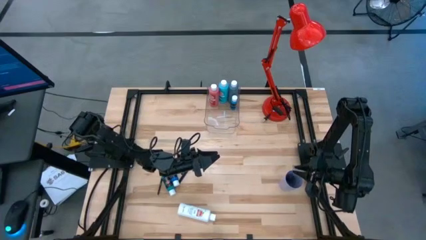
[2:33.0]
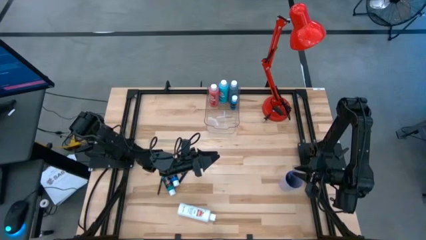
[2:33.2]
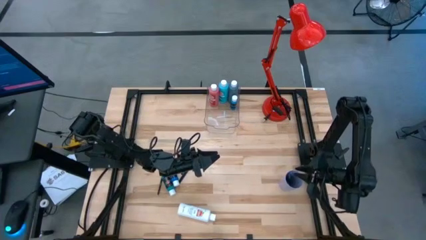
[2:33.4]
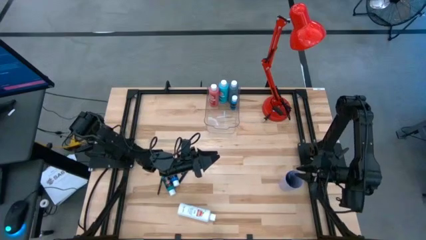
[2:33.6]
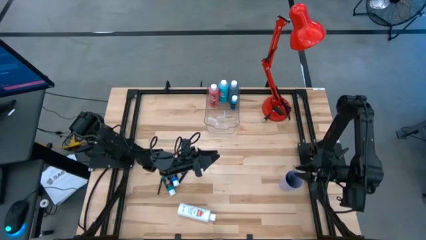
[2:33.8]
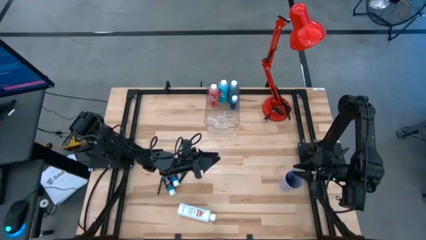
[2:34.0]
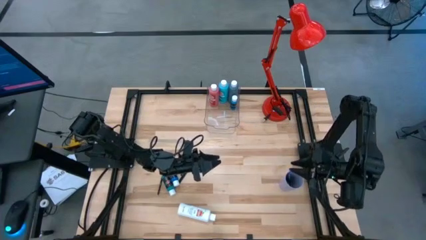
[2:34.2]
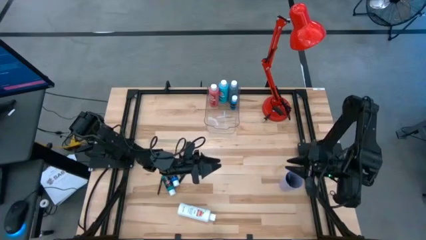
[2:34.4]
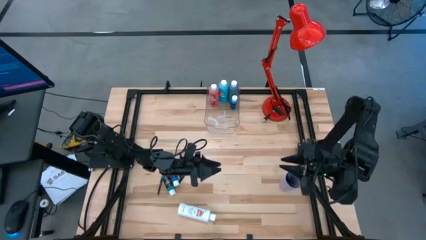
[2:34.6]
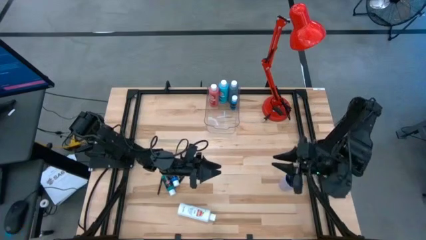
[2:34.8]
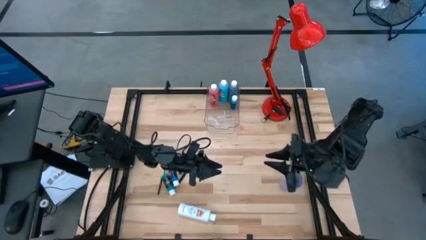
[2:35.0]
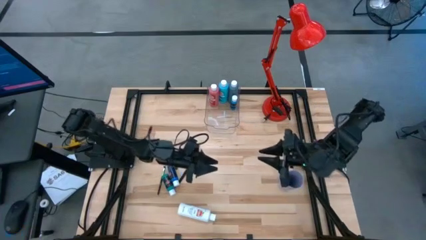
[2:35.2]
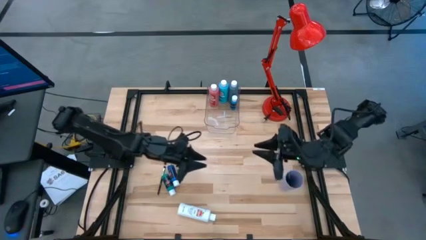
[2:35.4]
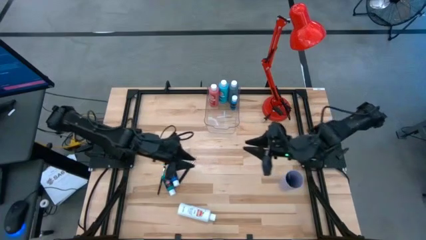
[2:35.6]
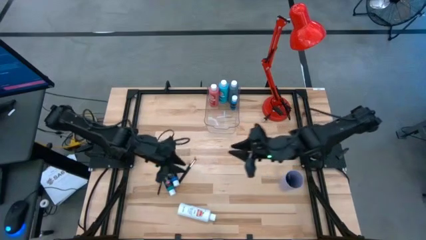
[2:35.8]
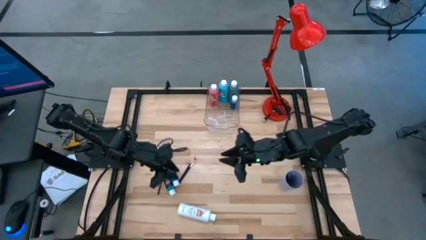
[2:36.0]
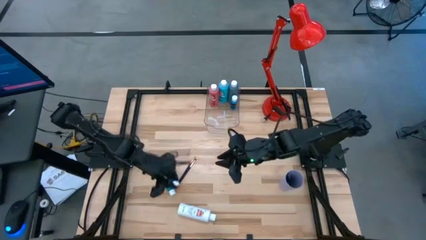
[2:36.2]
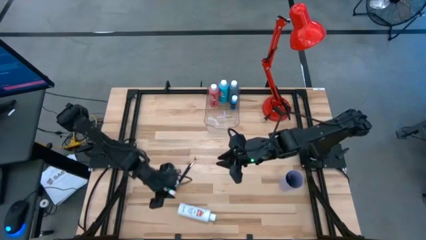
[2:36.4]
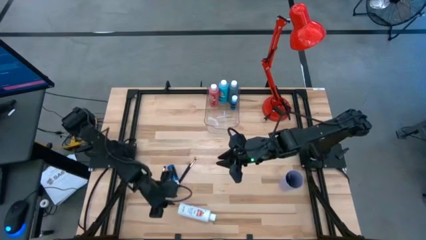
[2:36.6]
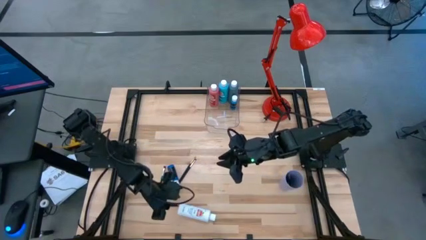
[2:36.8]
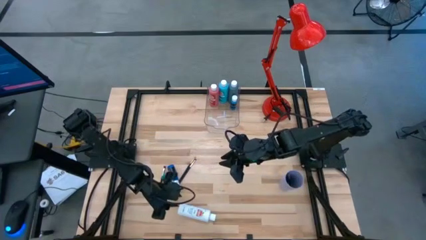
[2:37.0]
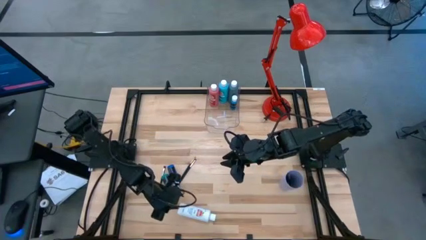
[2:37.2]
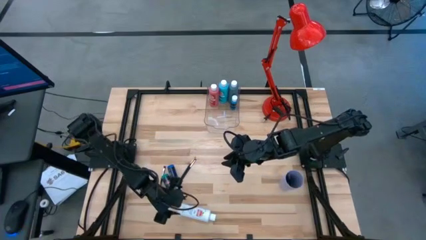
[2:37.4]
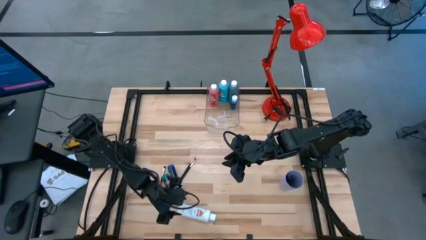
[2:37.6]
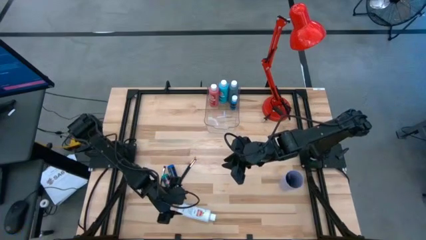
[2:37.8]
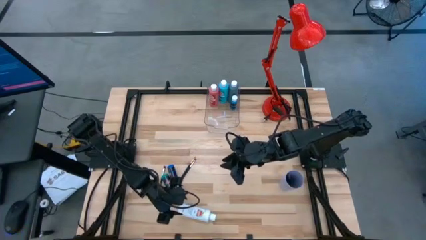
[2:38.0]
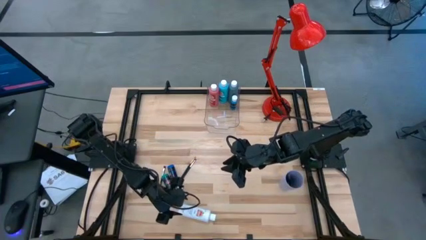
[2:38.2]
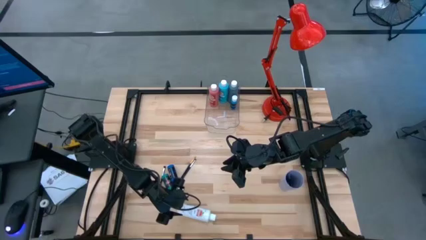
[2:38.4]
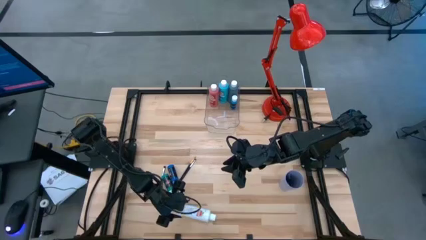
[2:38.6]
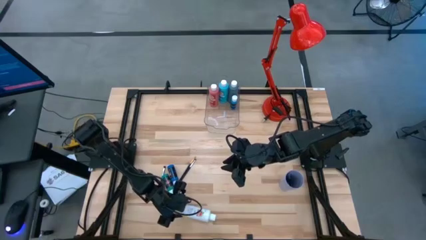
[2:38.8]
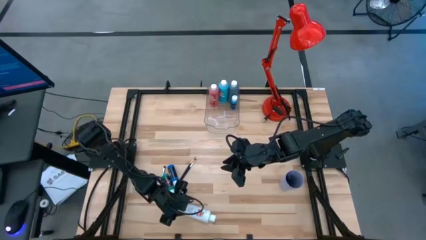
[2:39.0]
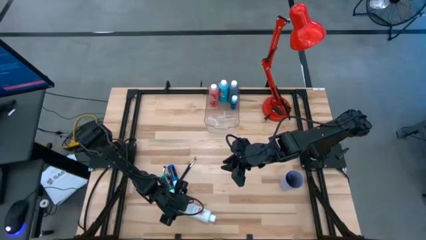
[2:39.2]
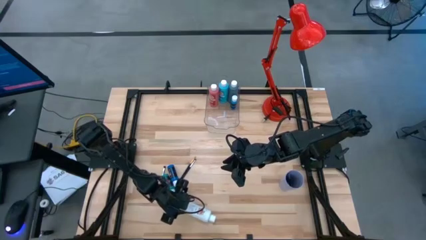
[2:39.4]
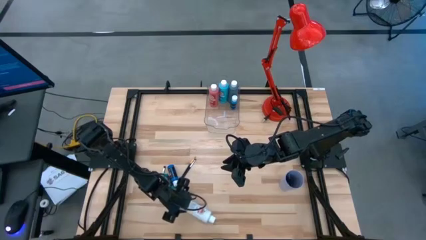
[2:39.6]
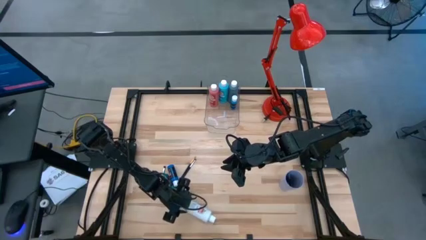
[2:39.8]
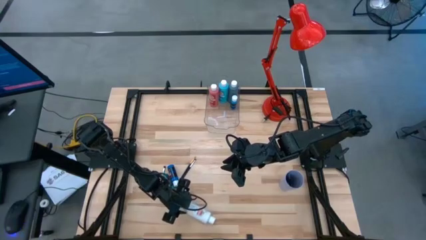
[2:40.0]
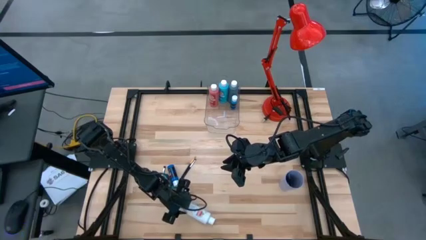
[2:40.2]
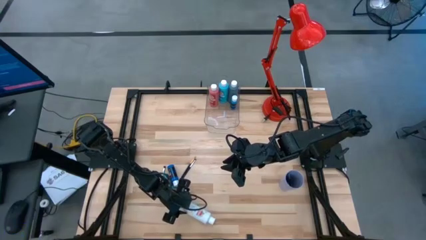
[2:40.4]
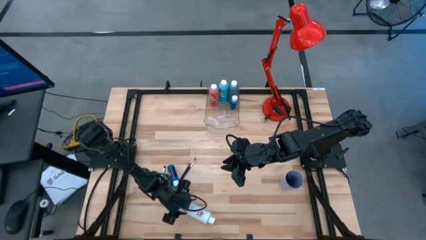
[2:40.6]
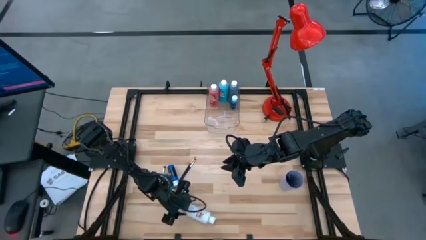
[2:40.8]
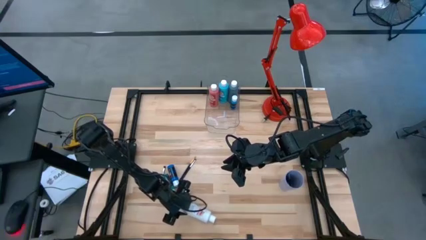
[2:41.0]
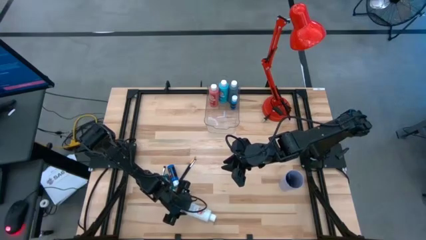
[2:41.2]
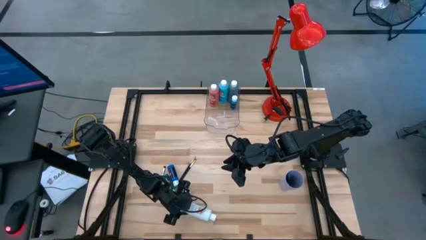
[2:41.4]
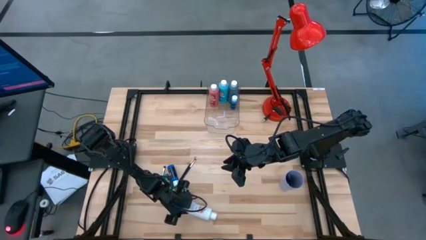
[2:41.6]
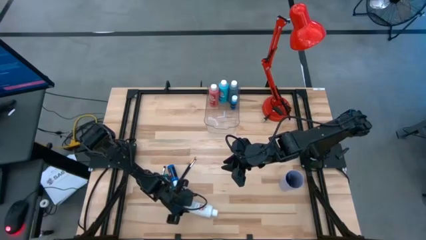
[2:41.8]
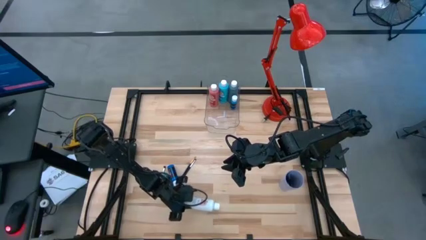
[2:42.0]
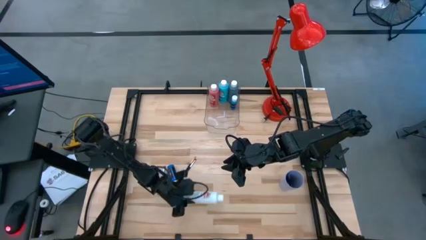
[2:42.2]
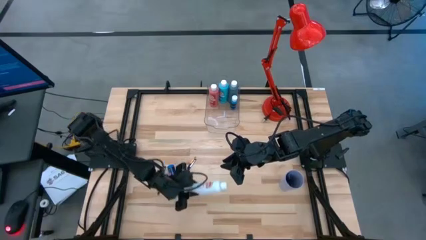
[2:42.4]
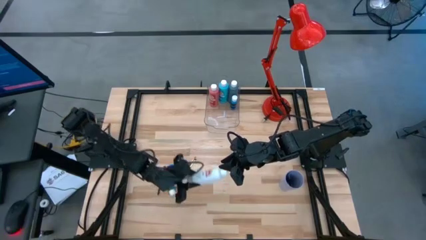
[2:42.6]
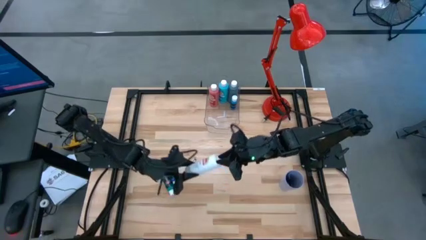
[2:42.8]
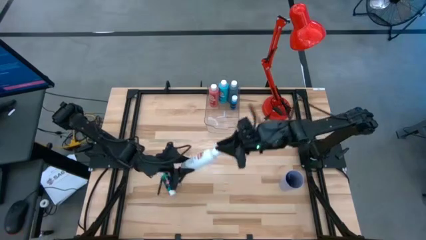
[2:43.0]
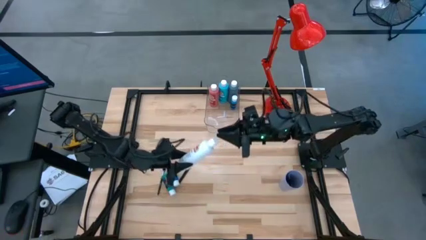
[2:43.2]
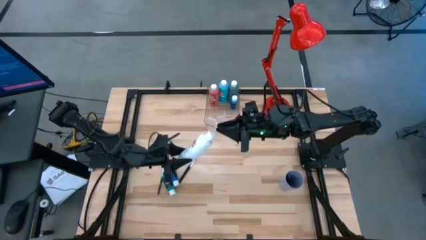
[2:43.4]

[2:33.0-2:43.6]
Task: Pick & Place Paint Supplies
Put the white paint bottle into the transparent bin

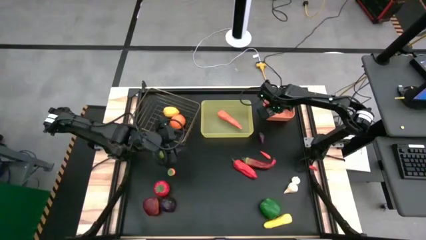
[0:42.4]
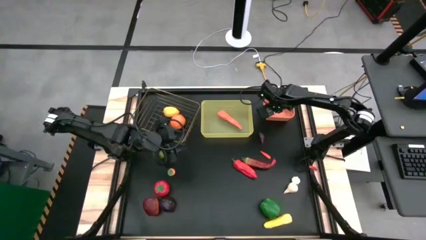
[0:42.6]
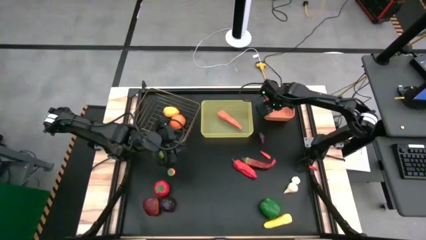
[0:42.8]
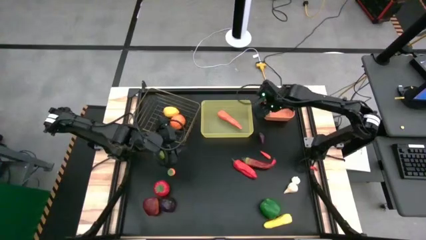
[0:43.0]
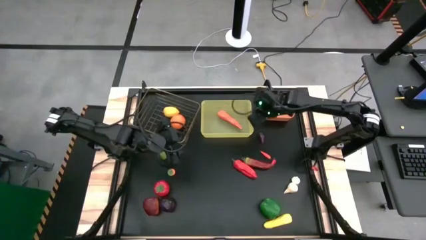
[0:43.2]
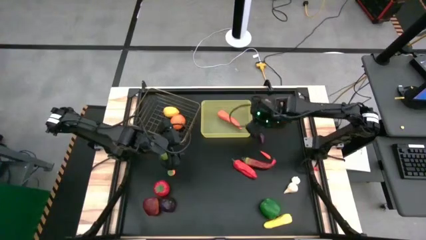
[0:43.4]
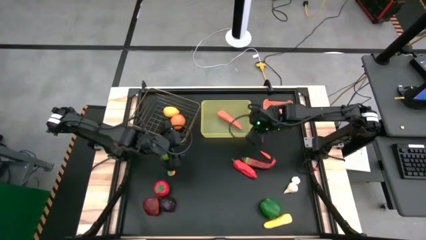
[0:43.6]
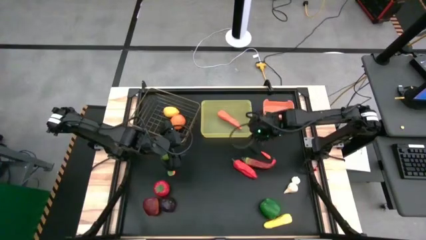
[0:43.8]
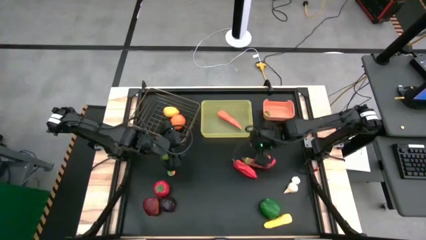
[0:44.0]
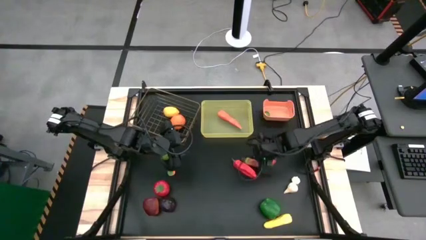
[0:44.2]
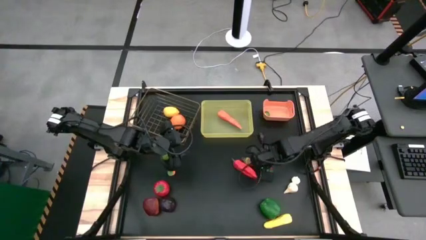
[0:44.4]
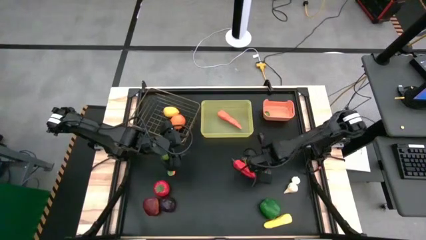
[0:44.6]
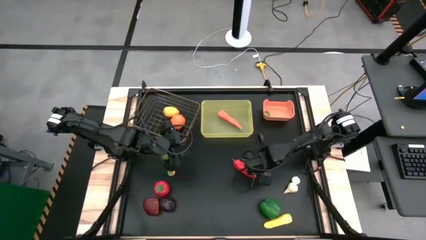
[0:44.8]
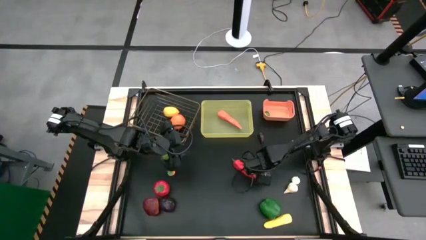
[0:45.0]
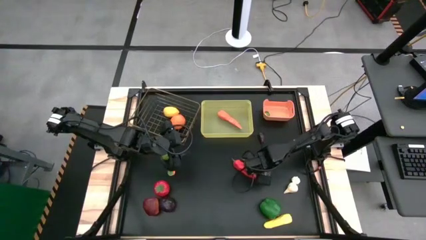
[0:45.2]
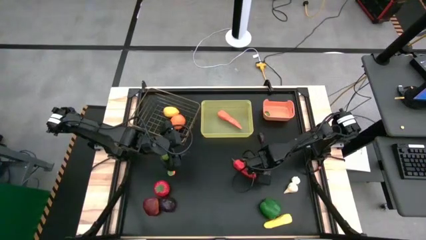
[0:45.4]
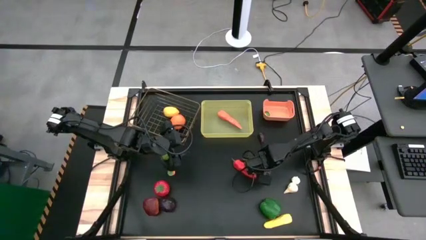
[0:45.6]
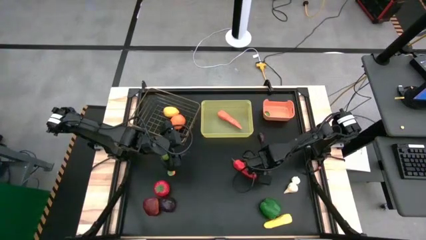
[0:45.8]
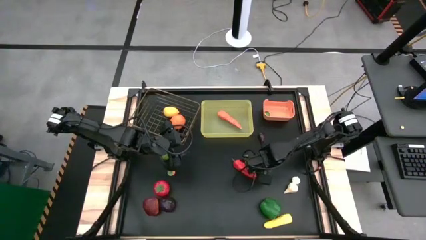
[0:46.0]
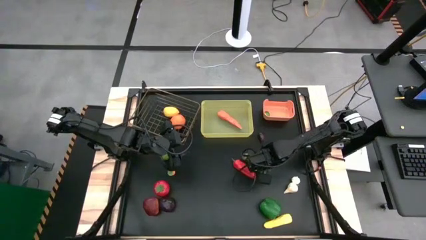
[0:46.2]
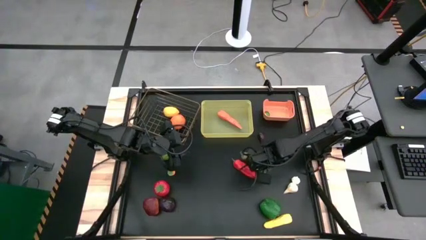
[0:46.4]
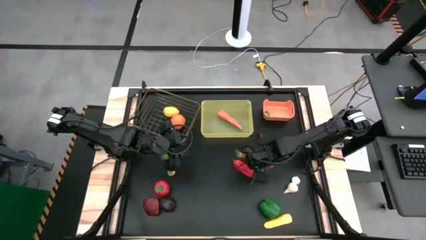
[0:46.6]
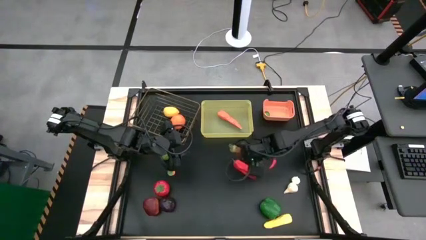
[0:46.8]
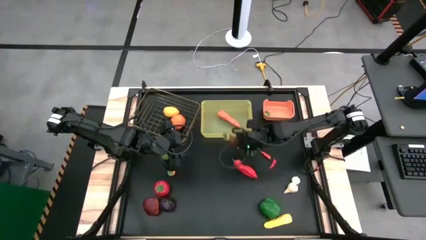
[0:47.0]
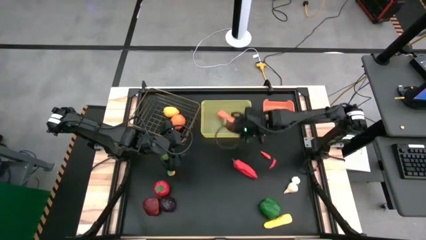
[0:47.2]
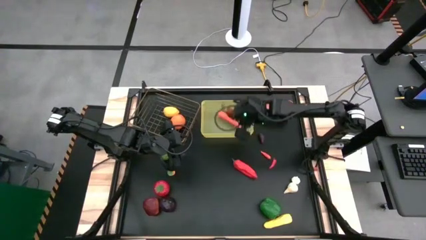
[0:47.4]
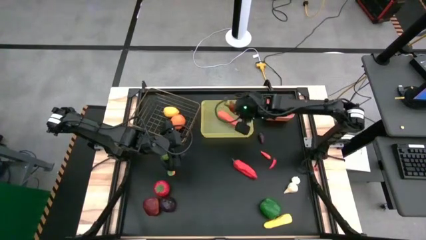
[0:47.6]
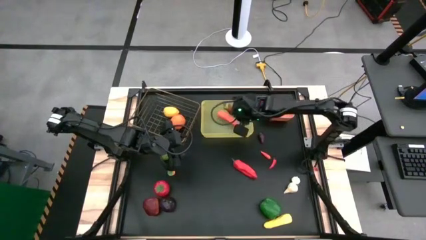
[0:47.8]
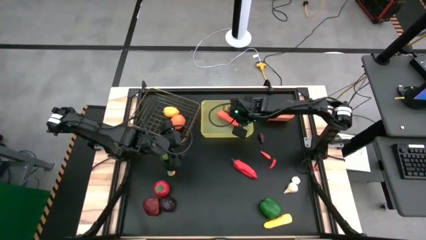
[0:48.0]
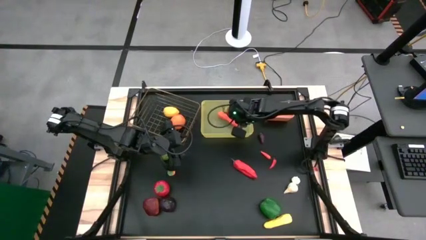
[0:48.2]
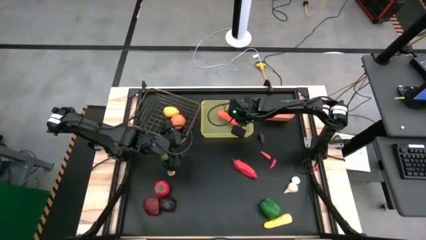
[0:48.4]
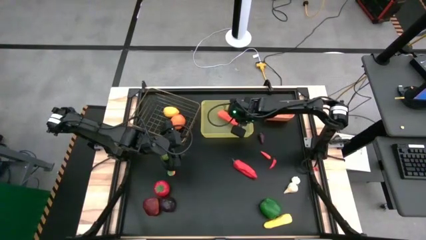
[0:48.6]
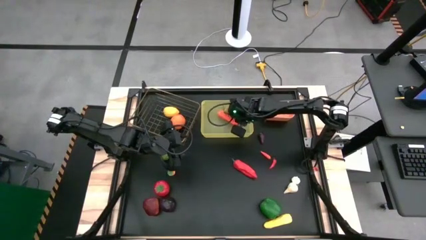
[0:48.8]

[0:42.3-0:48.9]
Task: Sort produce into baskets
Put the chili pepper into the yellow bin
